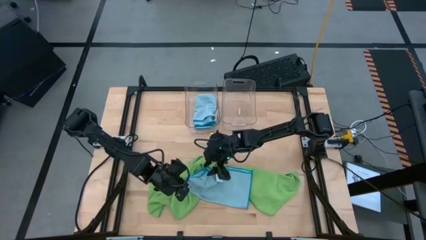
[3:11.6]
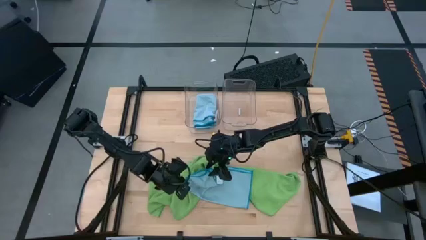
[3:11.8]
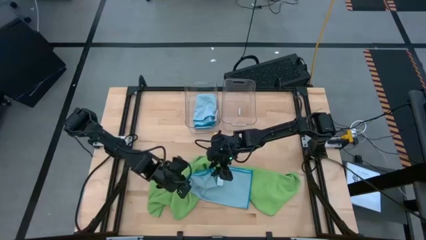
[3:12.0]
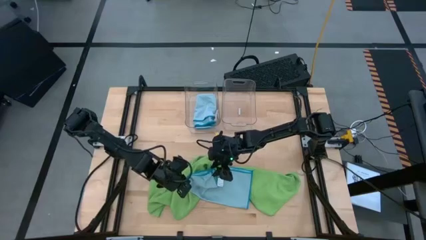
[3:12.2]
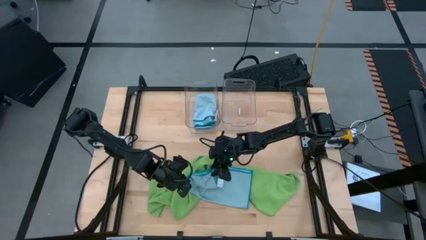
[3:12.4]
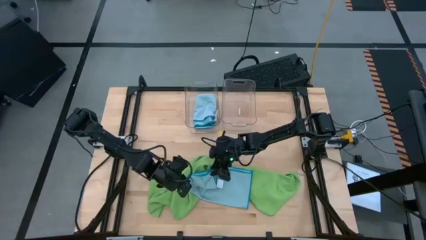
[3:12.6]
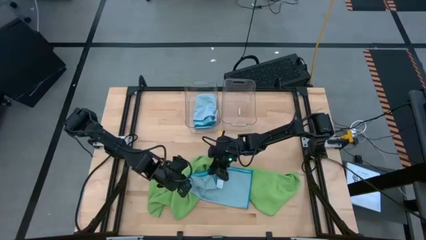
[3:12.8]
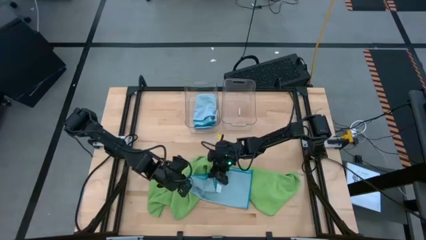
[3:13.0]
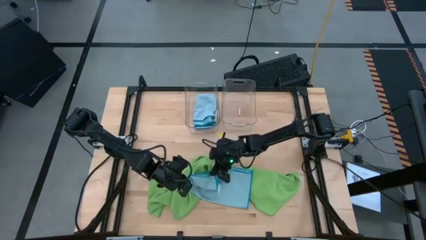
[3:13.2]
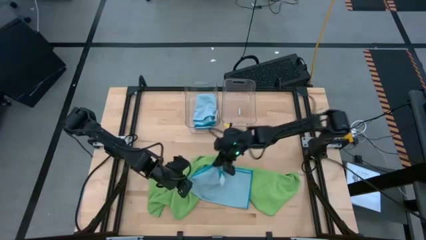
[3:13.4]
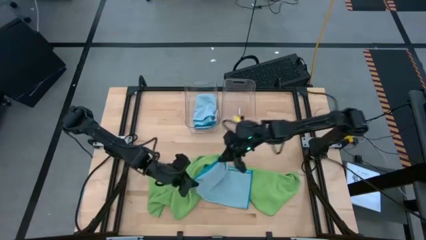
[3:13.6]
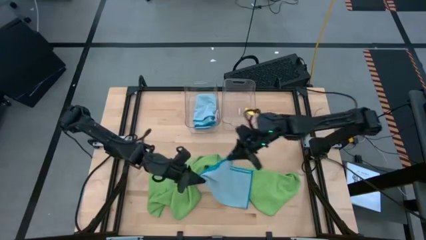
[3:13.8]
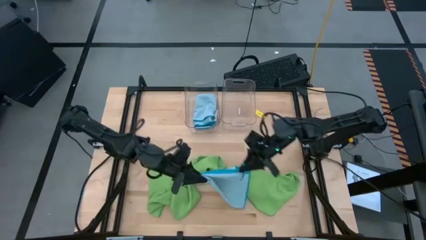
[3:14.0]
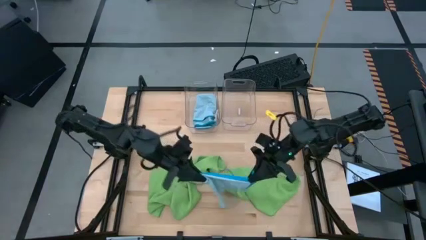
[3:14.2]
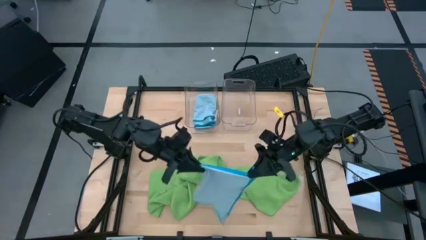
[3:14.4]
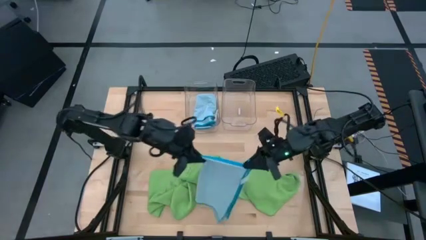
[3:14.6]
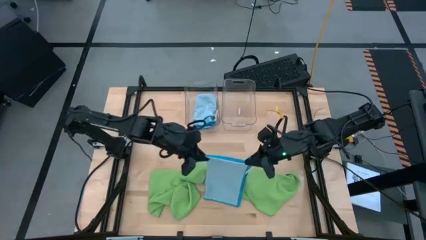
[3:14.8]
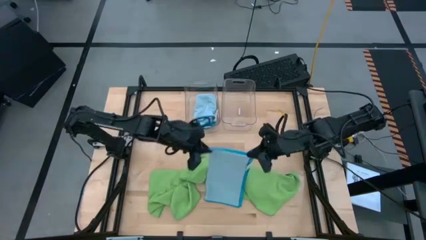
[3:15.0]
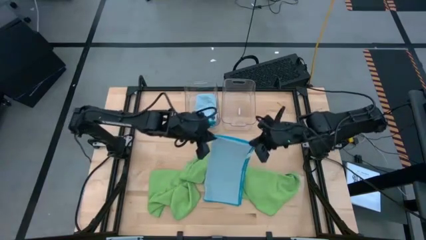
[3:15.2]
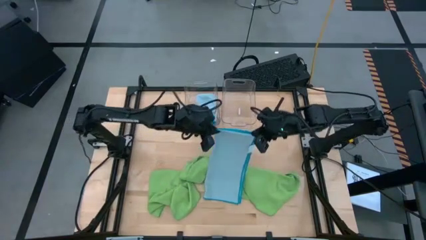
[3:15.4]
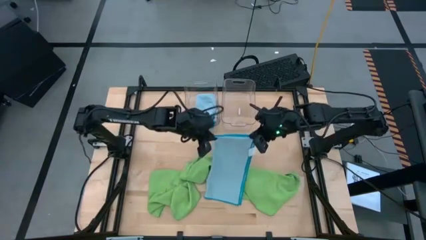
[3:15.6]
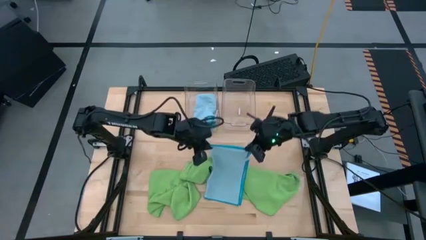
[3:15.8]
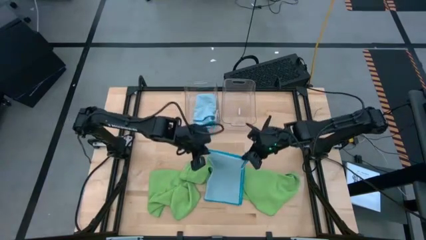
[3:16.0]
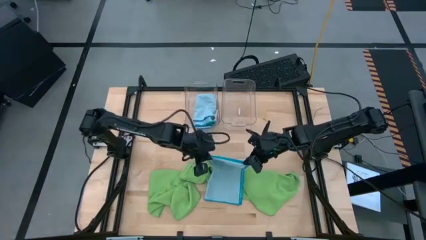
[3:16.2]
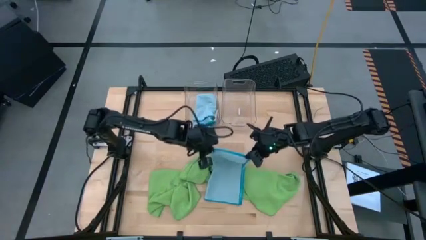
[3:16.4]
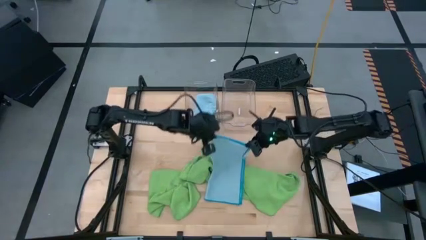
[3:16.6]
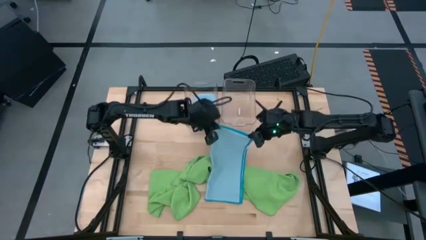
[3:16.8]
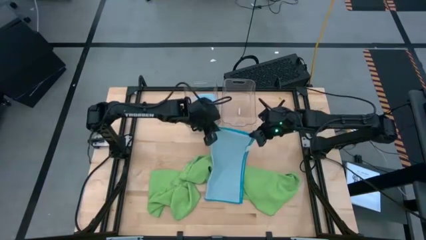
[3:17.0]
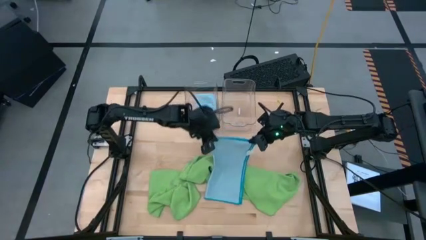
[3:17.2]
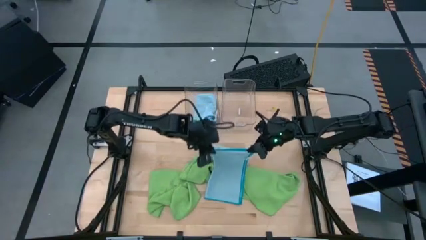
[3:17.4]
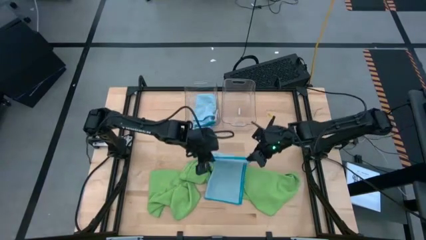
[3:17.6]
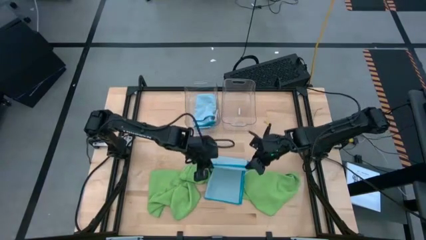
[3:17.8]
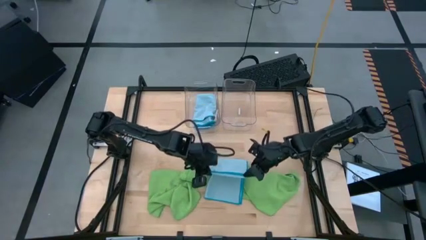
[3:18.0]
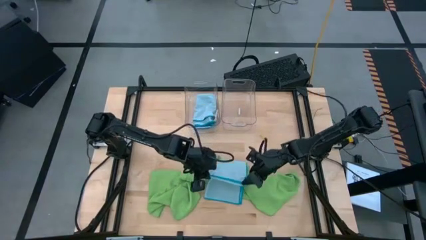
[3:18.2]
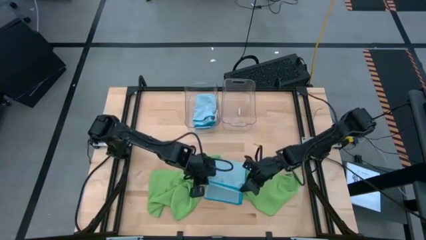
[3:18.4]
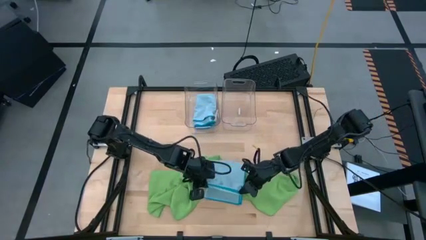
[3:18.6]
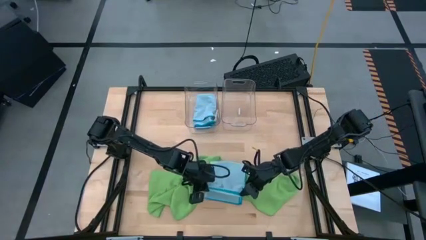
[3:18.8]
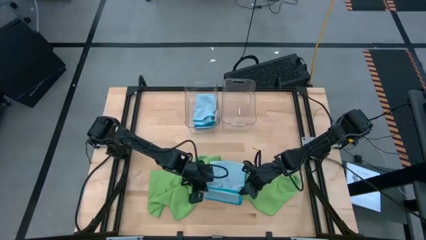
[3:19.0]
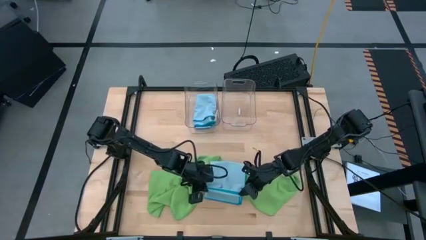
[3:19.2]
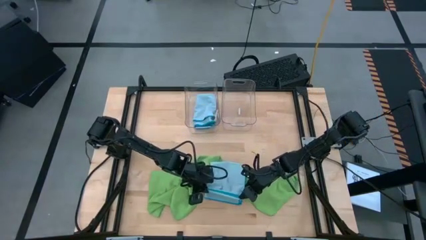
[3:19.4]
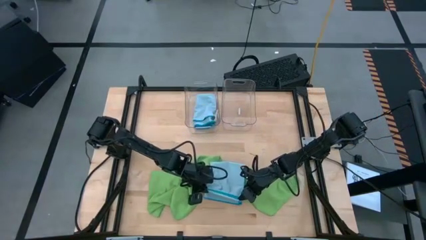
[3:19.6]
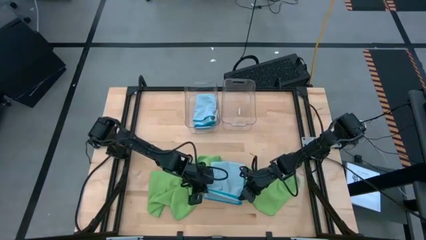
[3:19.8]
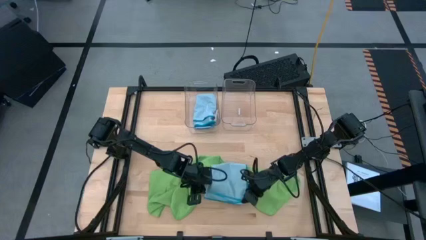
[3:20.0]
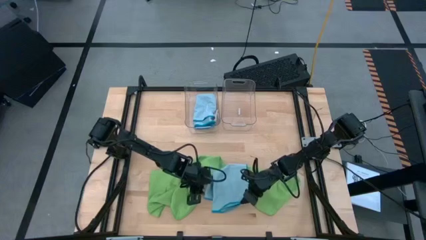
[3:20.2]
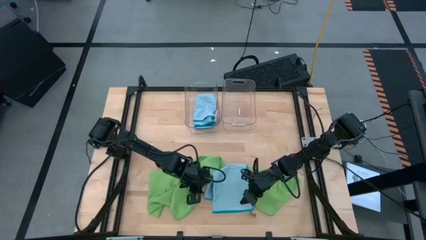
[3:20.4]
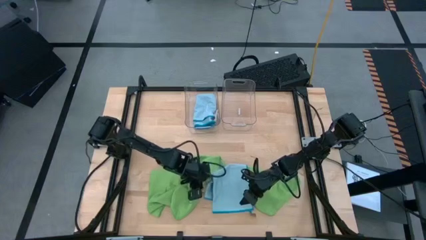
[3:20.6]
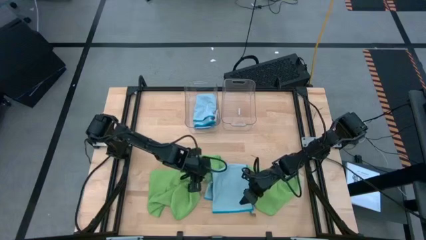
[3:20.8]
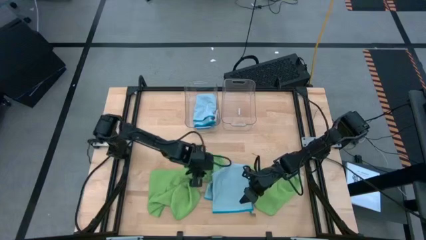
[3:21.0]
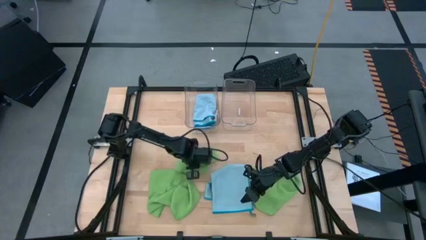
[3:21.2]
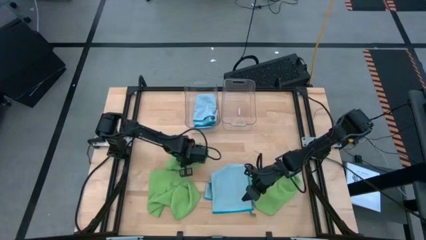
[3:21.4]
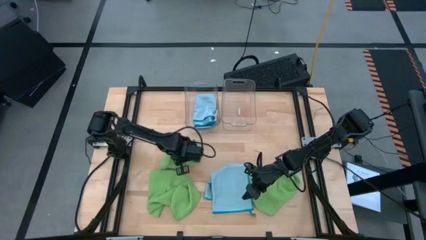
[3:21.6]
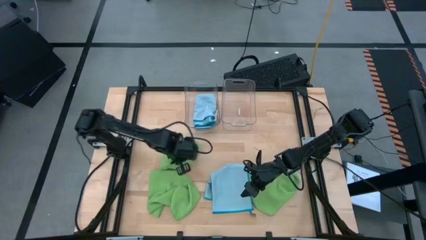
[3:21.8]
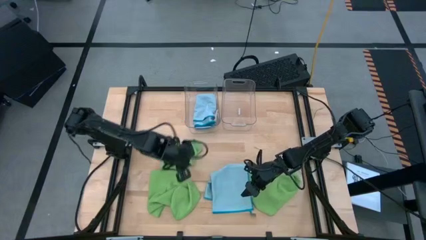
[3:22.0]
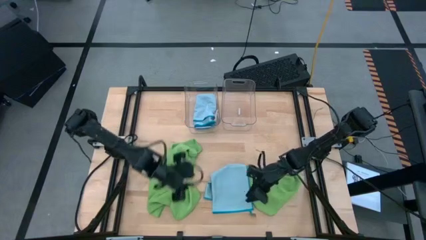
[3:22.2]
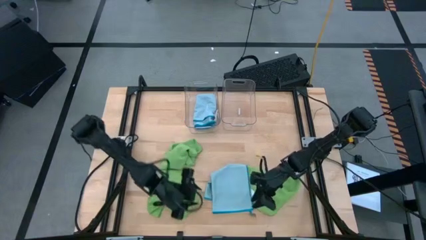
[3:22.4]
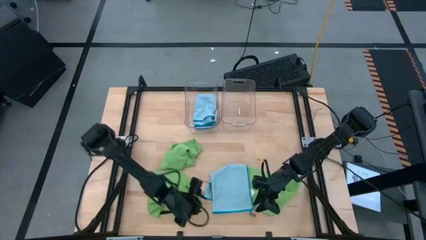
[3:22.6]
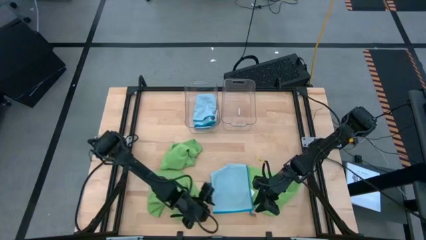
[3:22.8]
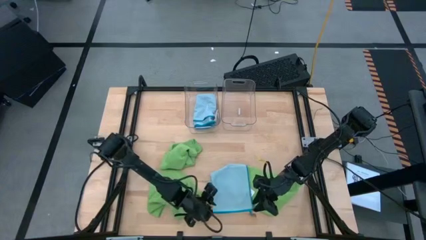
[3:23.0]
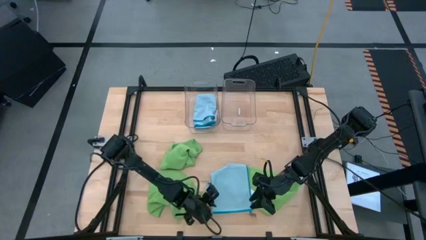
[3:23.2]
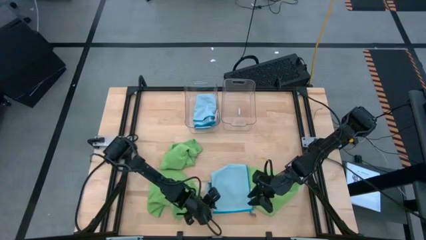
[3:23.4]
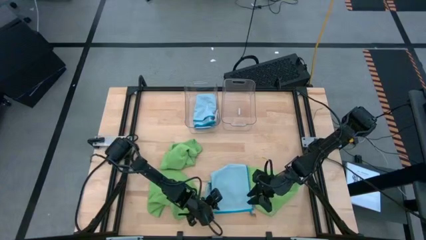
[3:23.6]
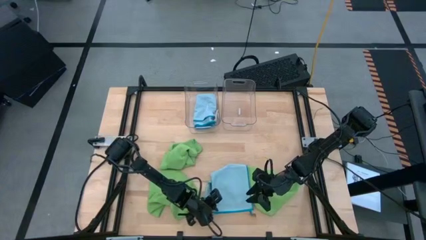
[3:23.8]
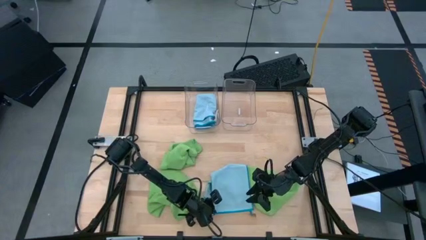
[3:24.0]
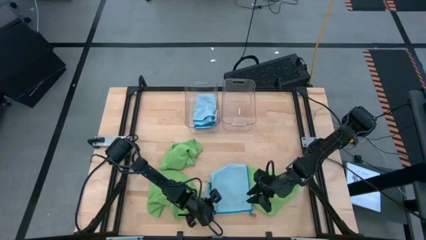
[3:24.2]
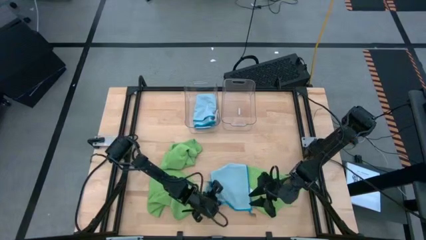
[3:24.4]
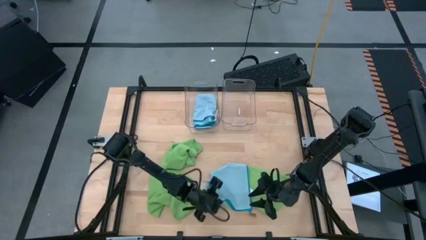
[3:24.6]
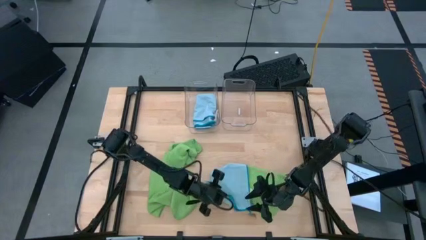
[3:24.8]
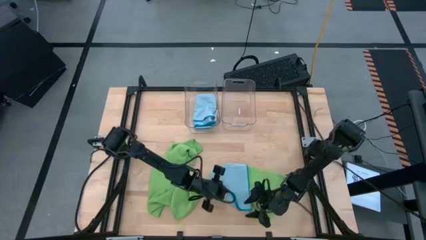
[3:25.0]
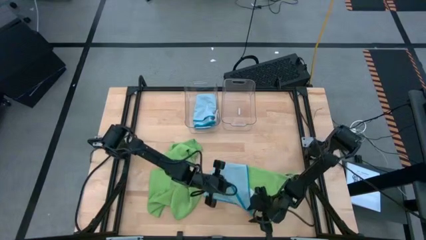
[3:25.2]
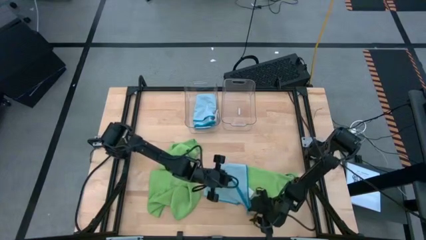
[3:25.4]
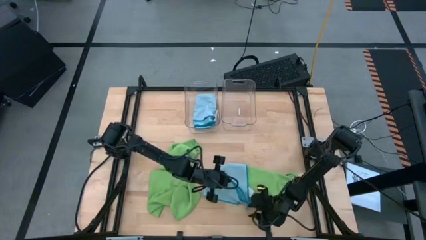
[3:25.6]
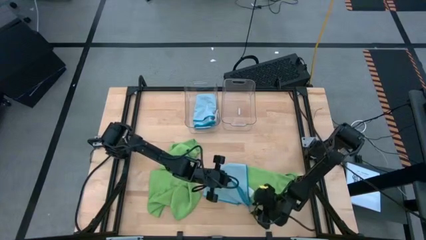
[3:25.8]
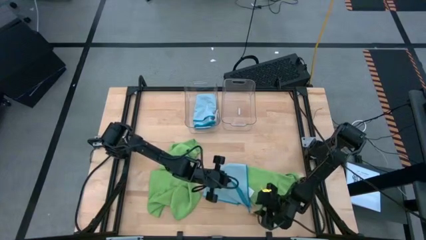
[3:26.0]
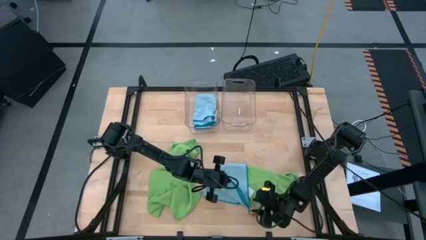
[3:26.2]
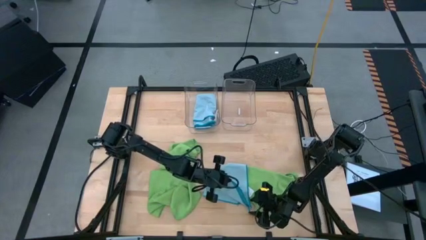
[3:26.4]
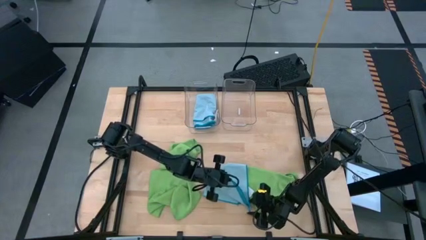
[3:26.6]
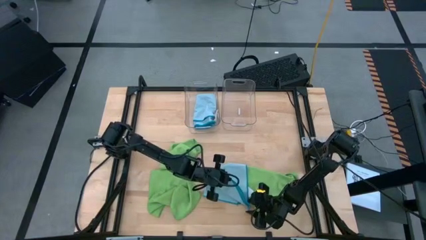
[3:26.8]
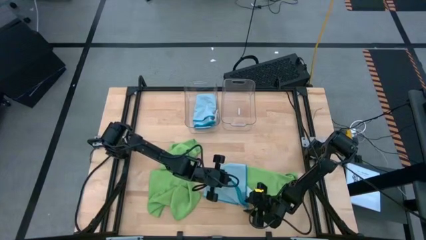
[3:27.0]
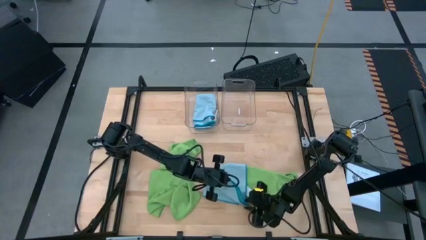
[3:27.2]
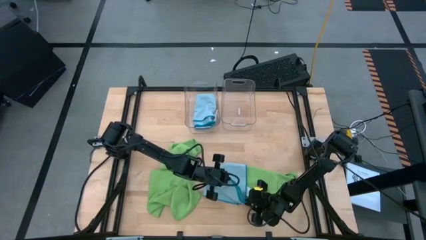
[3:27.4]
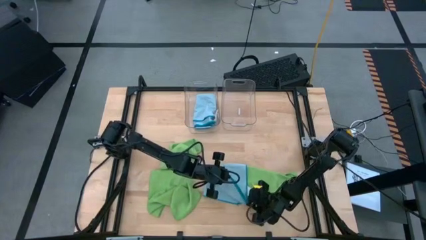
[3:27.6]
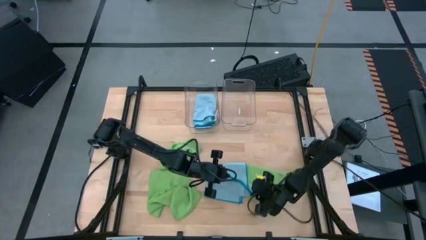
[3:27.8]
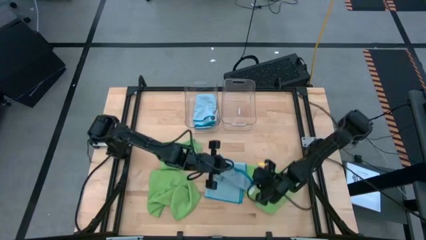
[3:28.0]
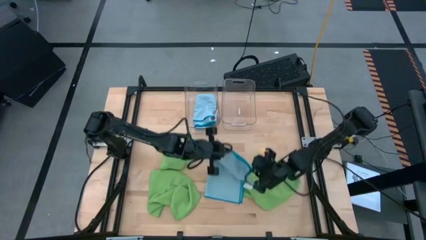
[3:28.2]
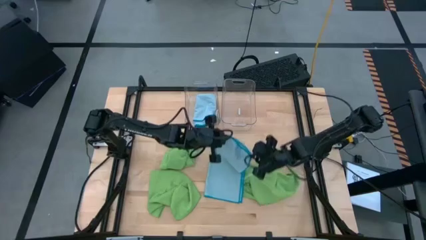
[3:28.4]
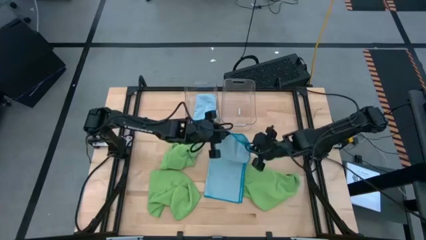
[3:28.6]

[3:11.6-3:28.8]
Task: Fold microfiber towels
Fold the blue microfiber towel
